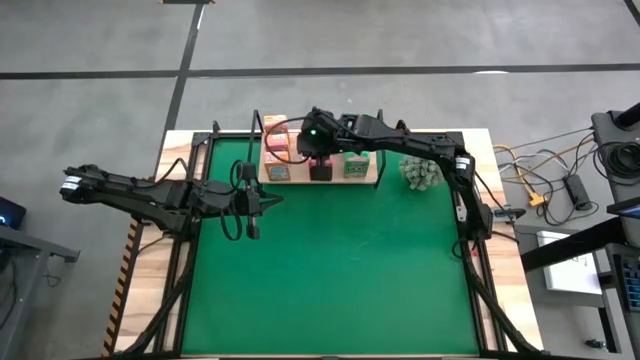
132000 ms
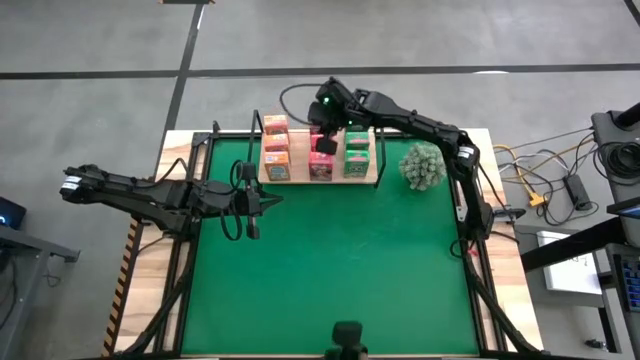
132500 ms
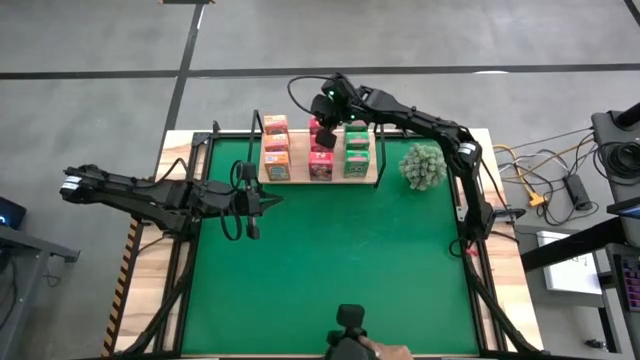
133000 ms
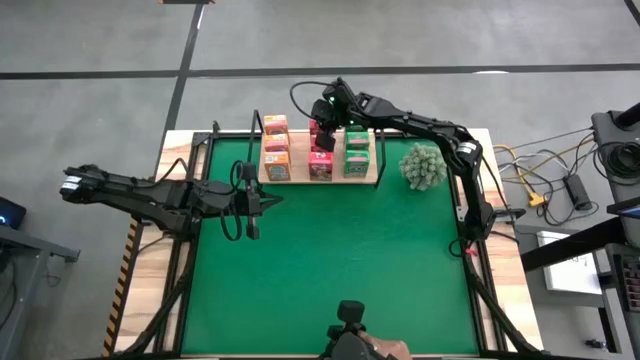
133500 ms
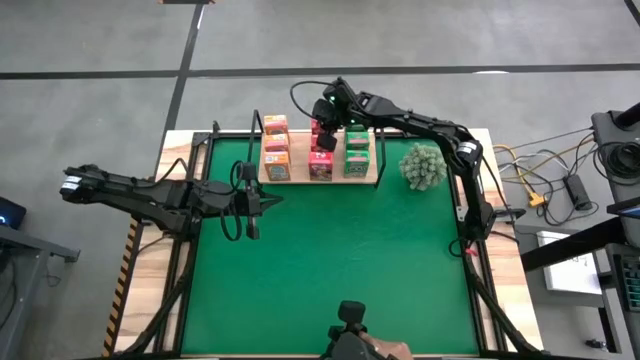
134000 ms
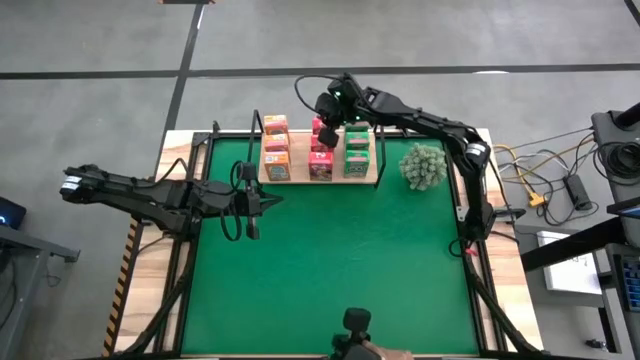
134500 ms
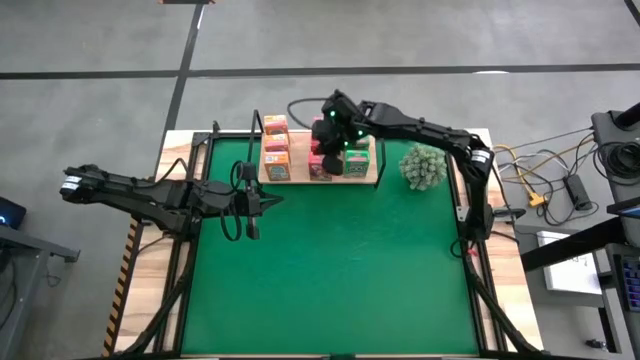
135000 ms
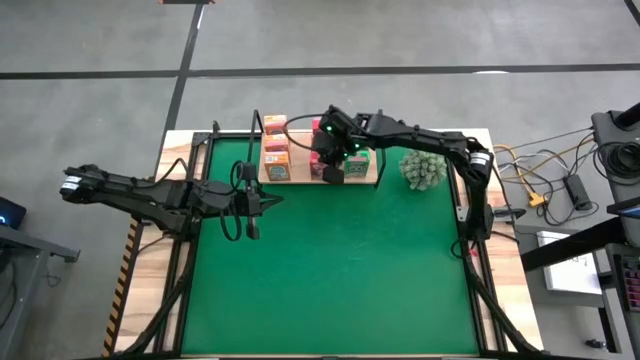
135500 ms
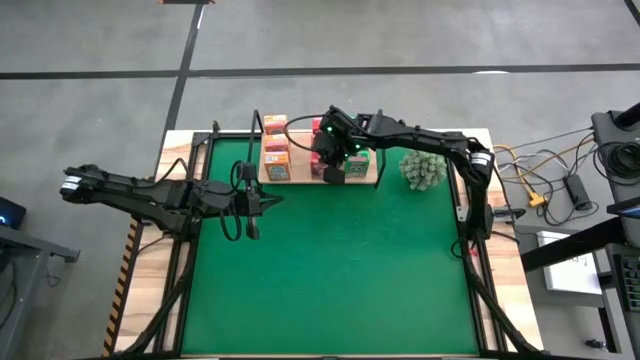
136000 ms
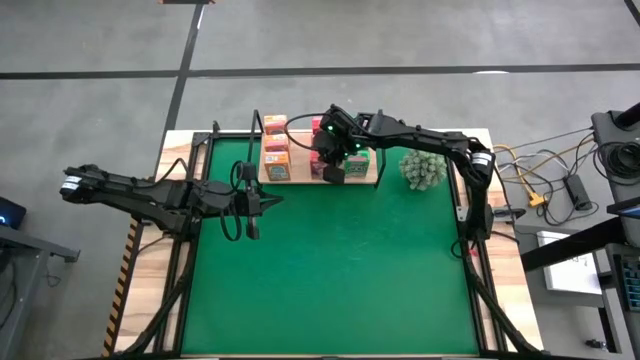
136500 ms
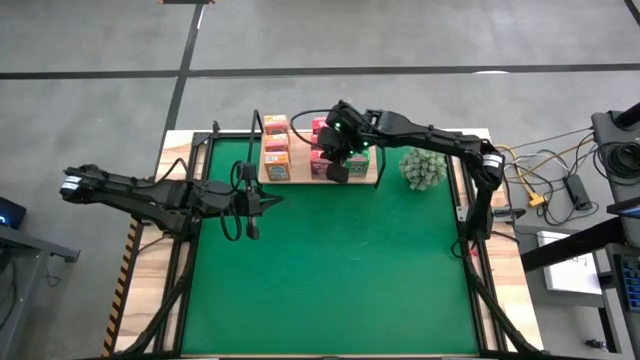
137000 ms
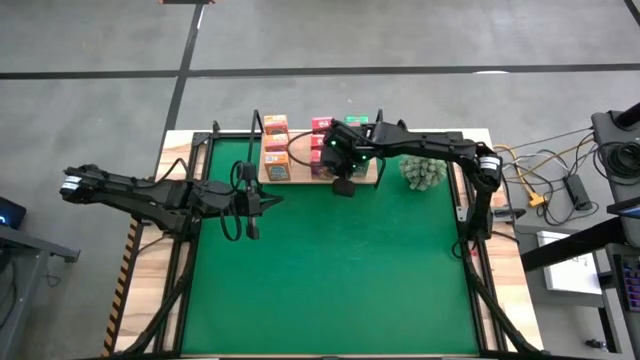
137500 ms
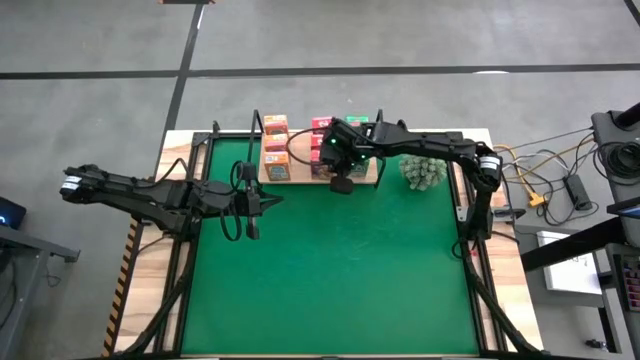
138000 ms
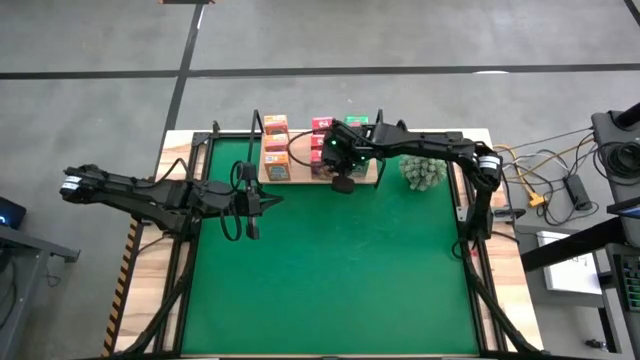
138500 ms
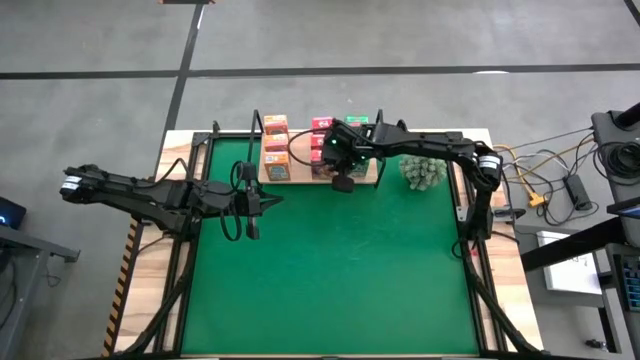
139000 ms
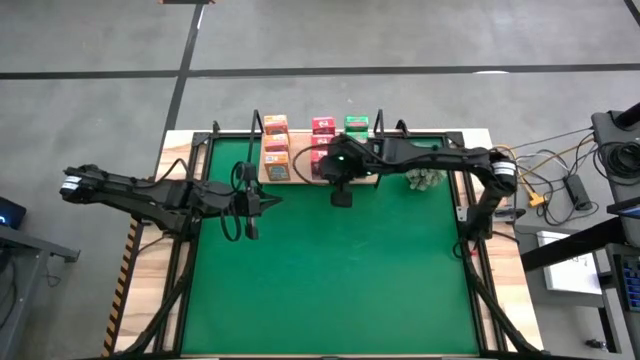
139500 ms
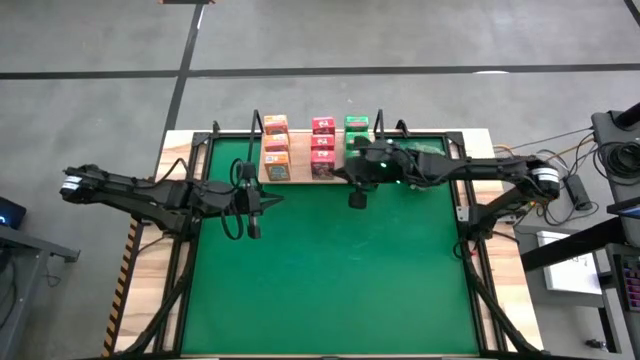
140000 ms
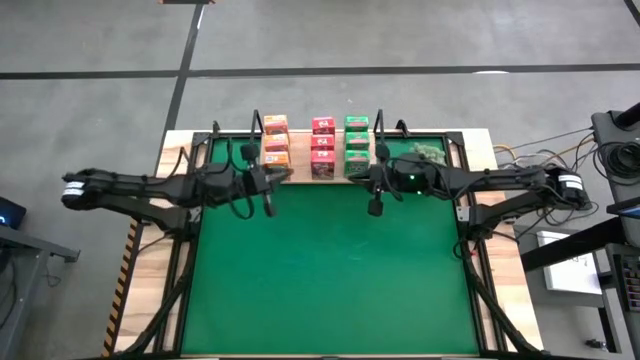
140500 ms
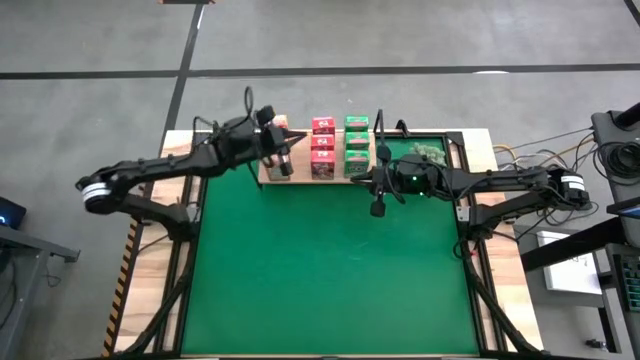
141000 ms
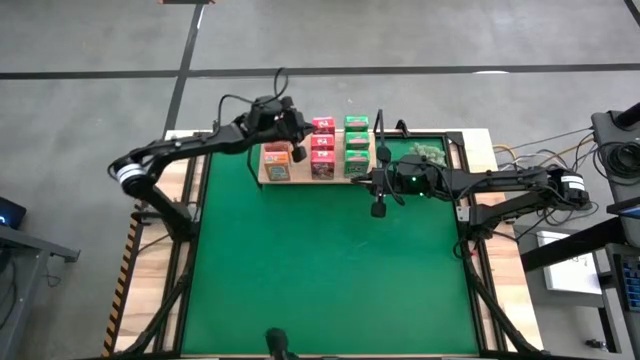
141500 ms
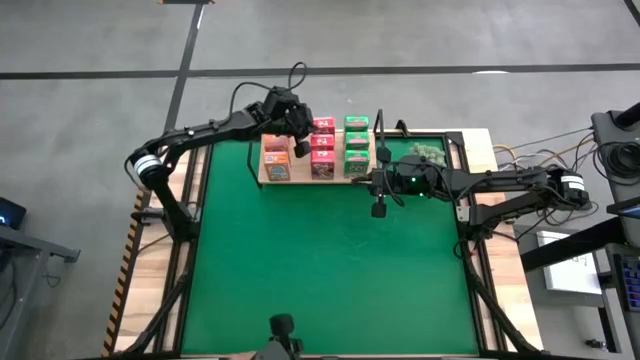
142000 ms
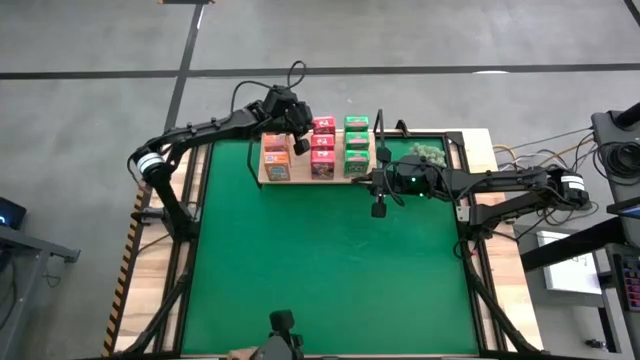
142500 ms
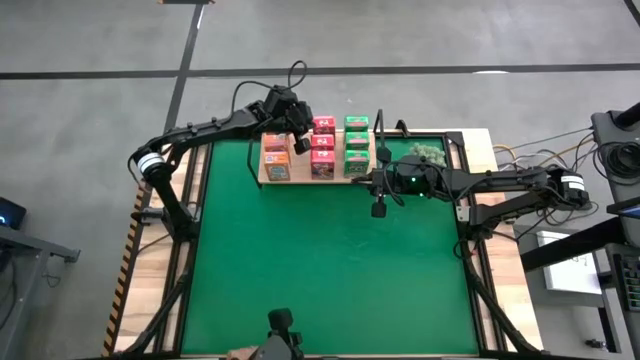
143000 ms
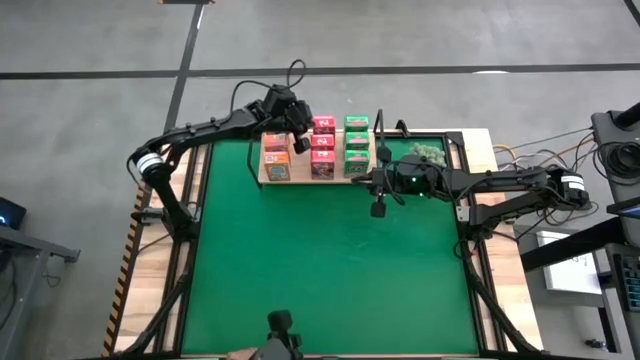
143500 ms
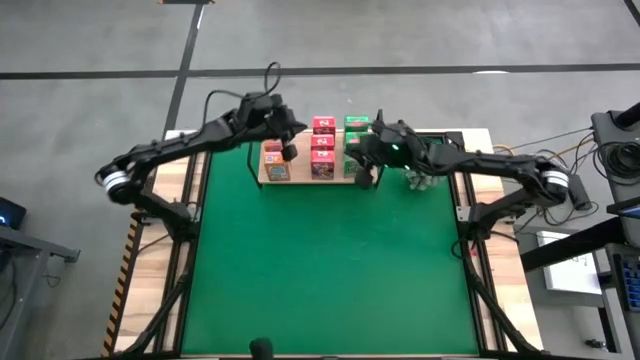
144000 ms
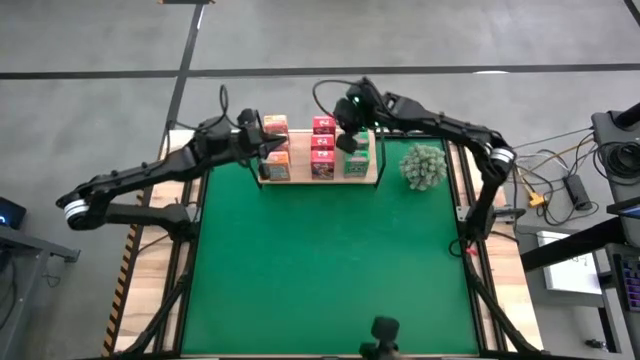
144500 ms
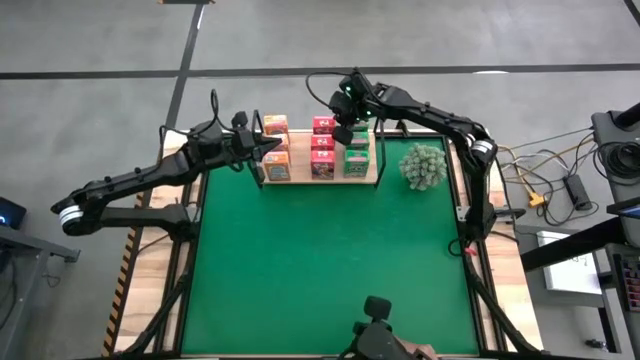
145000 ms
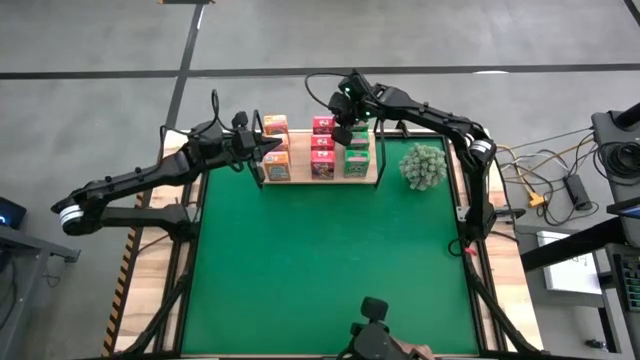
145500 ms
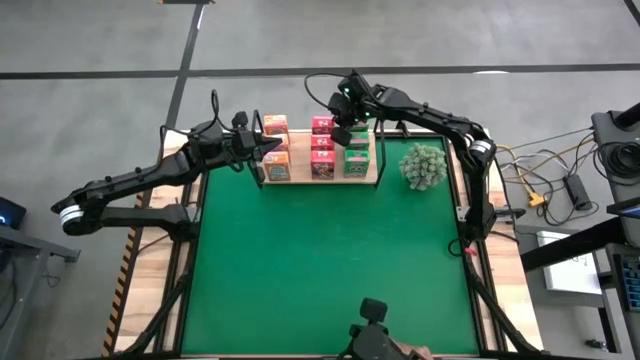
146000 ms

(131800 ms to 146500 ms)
Task: Stack cereal on shelf
Adjust the red cereal boxes on the shelf

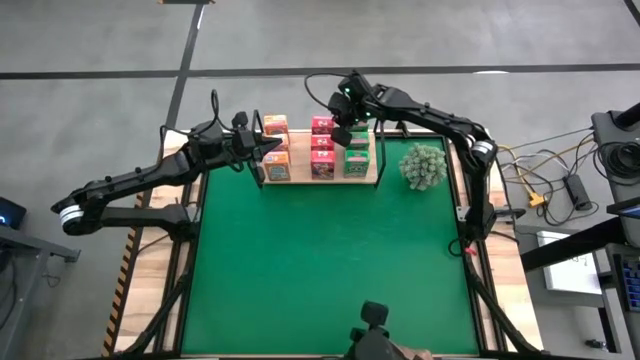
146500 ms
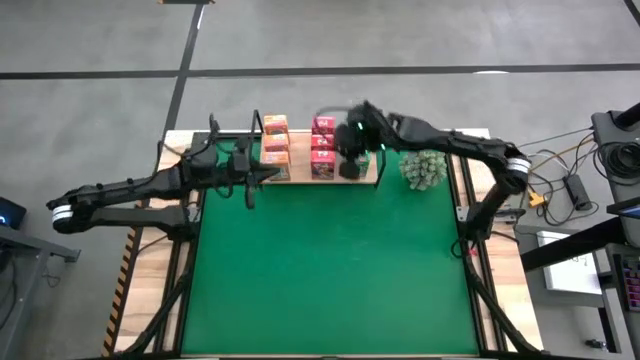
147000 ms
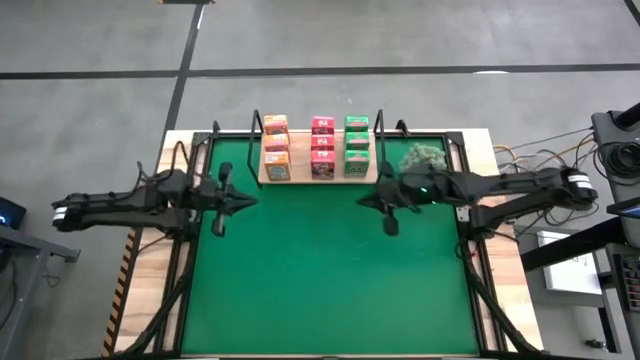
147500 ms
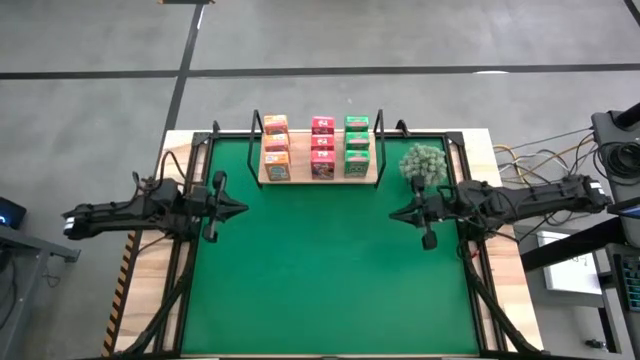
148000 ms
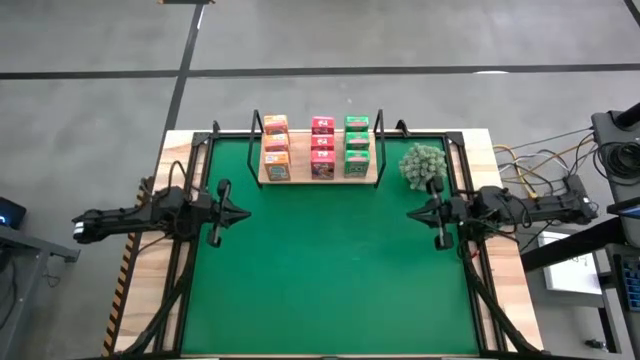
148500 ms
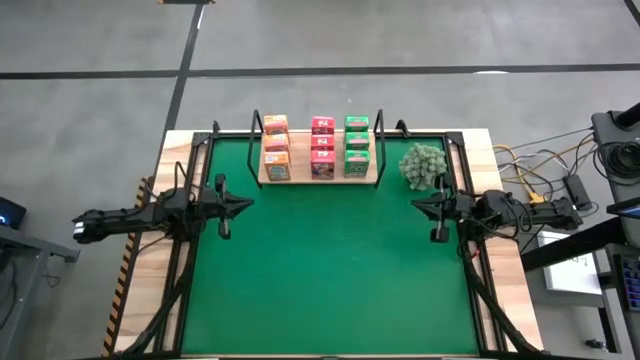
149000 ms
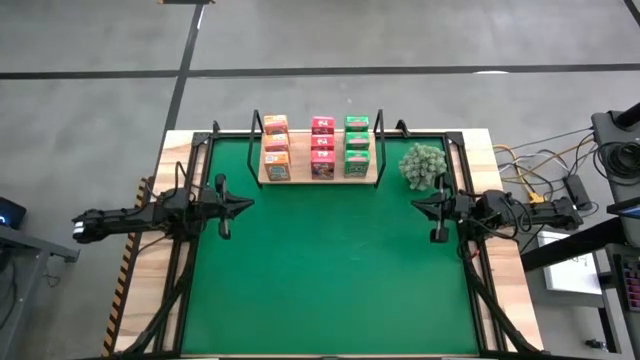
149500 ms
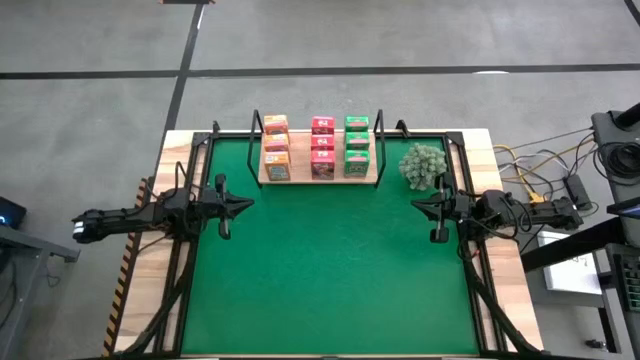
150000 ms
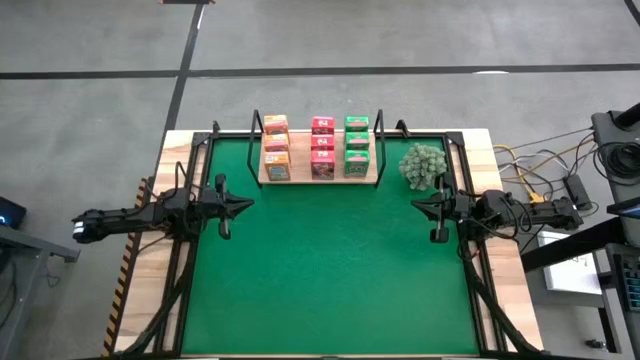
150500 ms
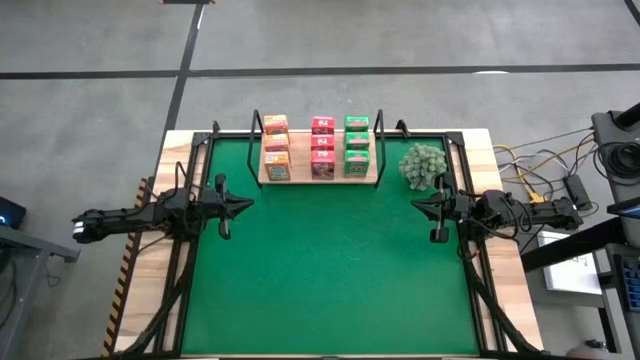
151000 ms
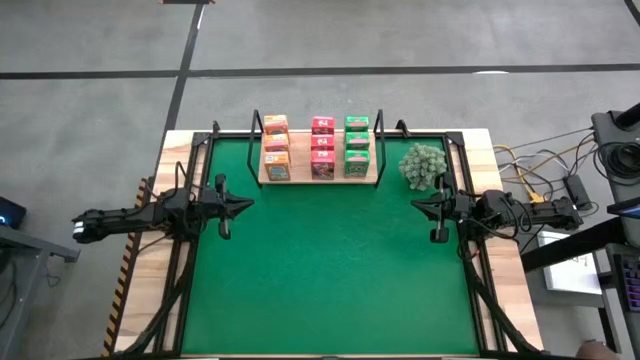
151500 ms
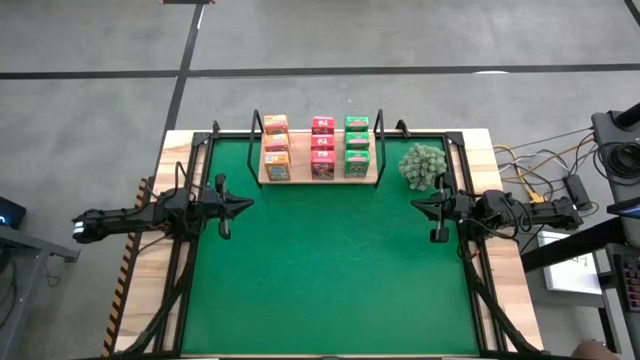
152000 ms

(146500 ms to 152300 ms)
Return to Home Position
